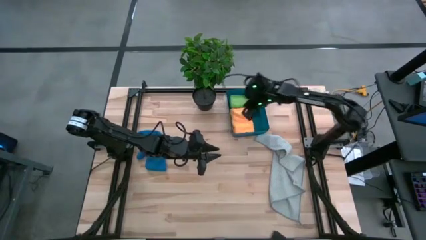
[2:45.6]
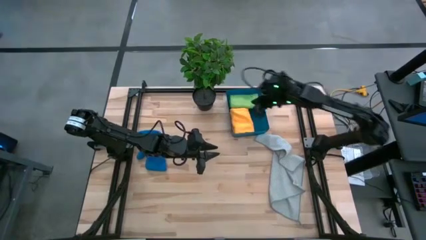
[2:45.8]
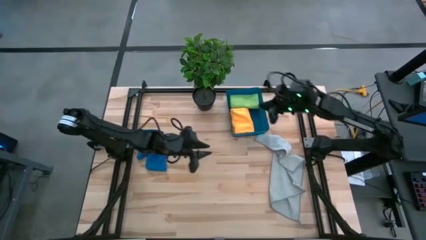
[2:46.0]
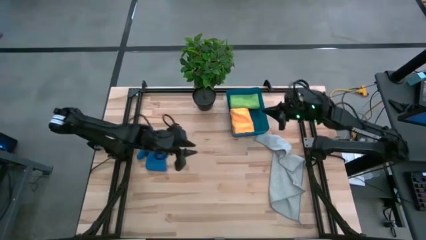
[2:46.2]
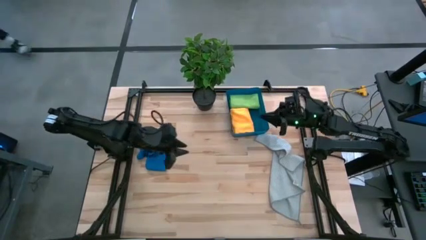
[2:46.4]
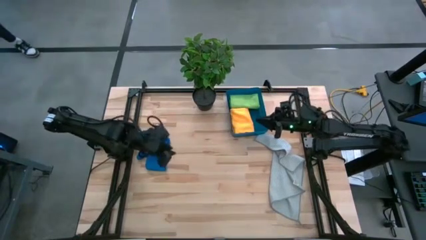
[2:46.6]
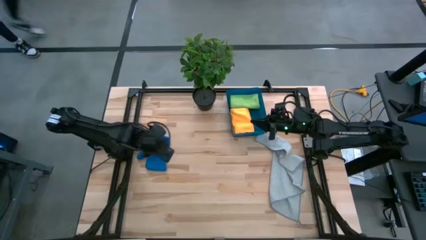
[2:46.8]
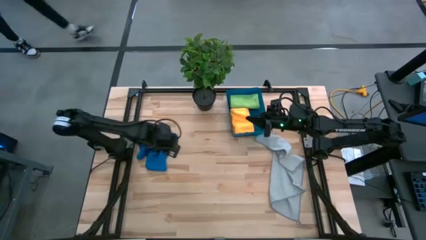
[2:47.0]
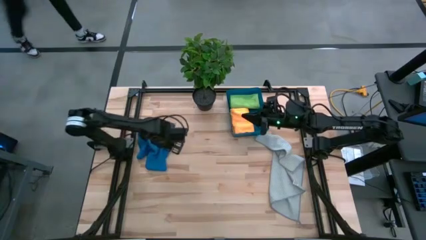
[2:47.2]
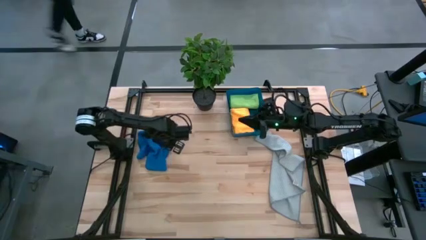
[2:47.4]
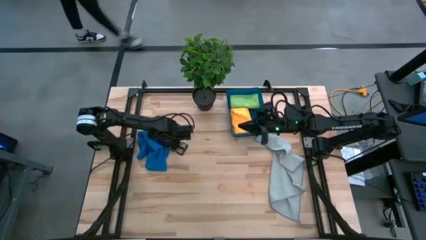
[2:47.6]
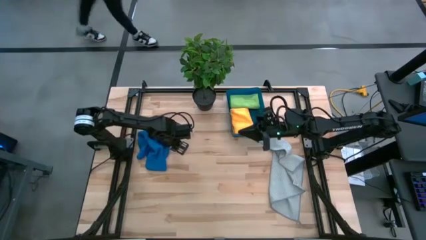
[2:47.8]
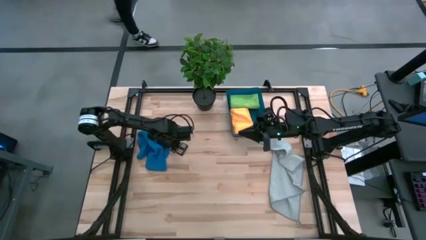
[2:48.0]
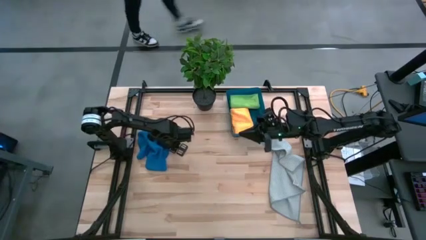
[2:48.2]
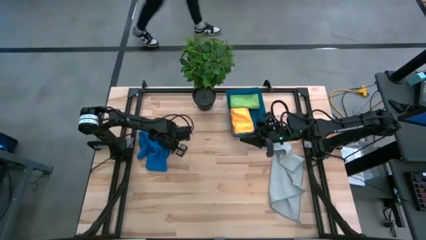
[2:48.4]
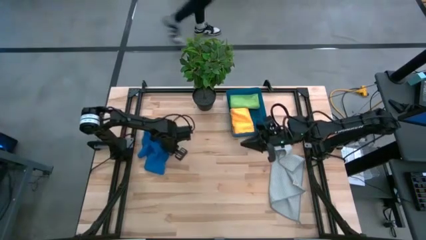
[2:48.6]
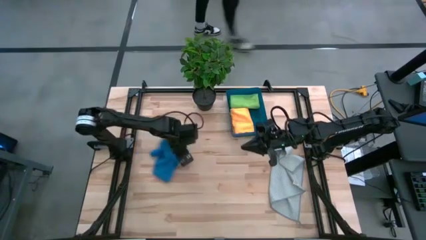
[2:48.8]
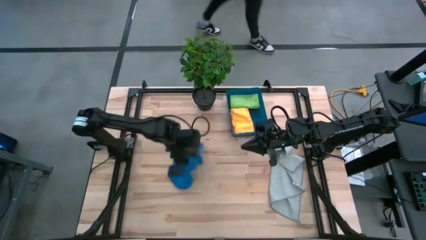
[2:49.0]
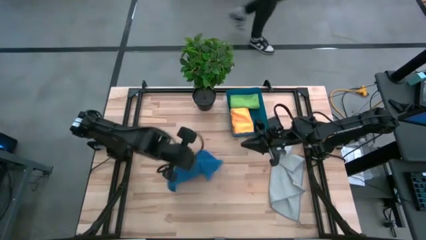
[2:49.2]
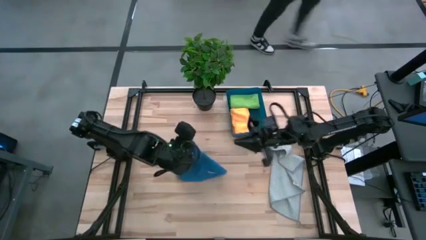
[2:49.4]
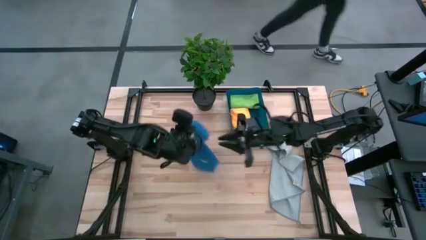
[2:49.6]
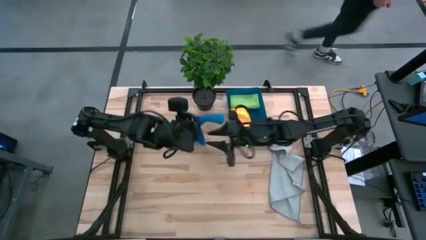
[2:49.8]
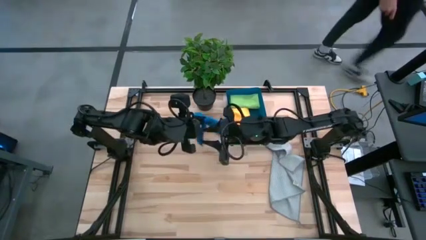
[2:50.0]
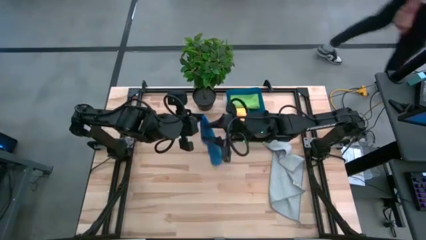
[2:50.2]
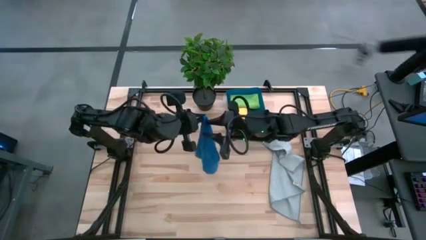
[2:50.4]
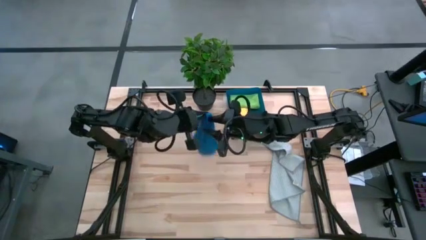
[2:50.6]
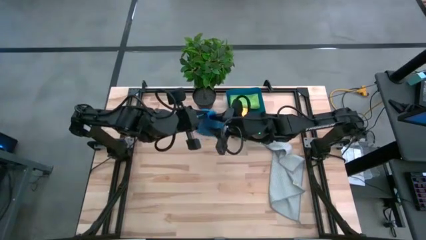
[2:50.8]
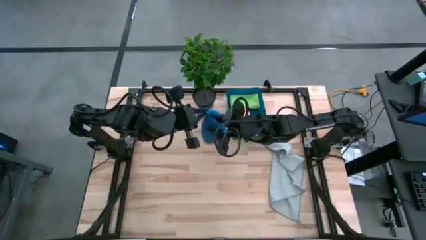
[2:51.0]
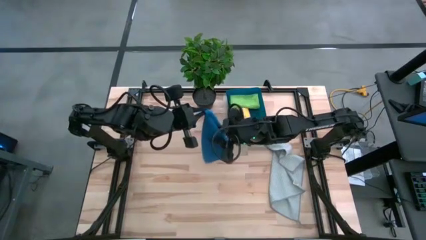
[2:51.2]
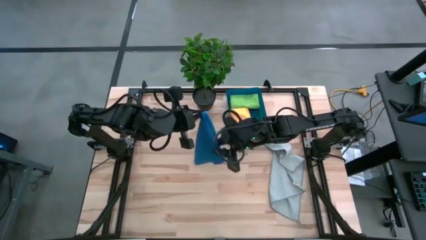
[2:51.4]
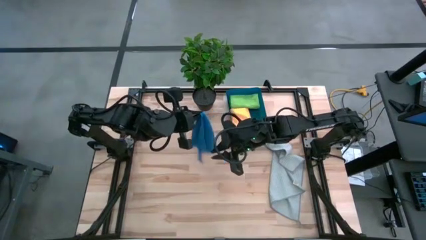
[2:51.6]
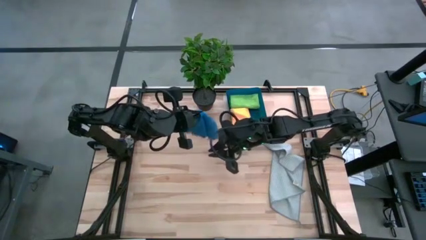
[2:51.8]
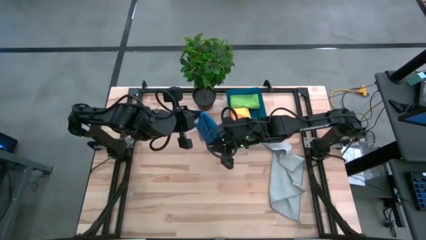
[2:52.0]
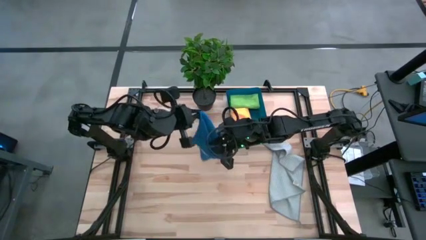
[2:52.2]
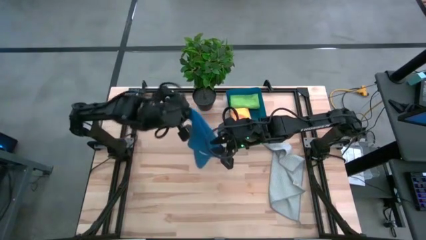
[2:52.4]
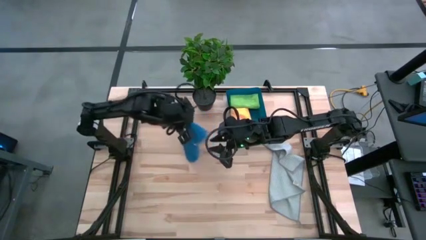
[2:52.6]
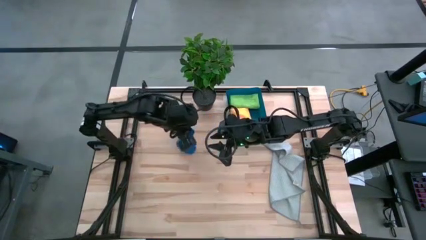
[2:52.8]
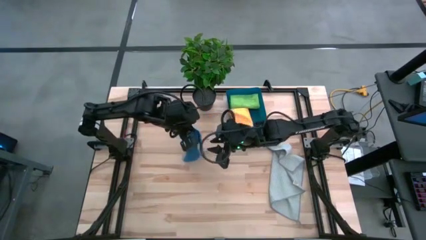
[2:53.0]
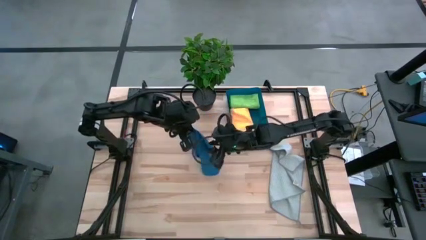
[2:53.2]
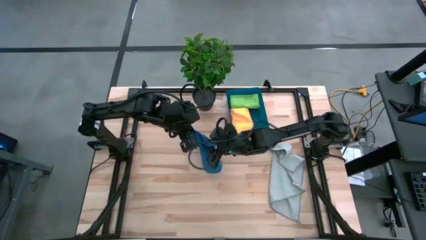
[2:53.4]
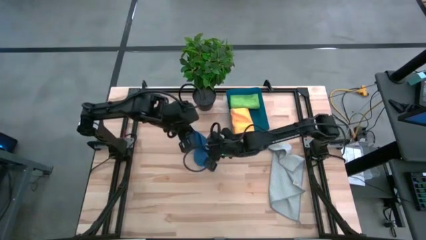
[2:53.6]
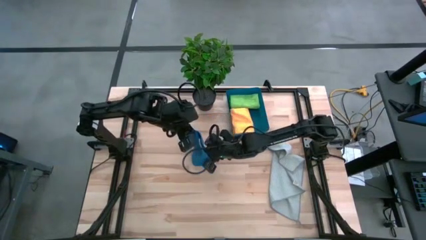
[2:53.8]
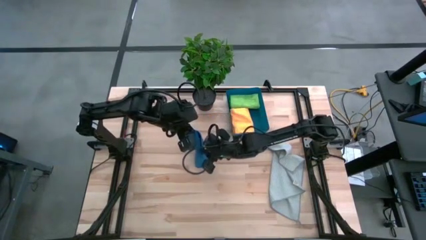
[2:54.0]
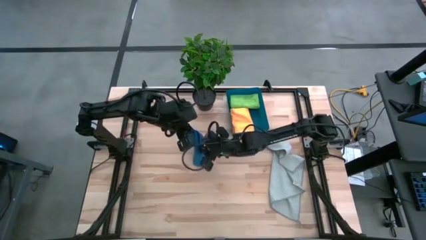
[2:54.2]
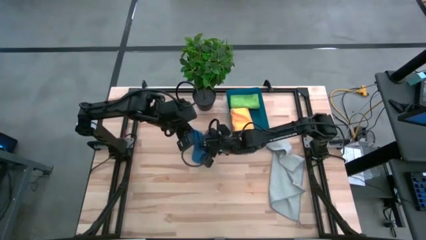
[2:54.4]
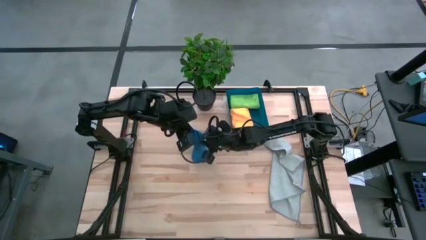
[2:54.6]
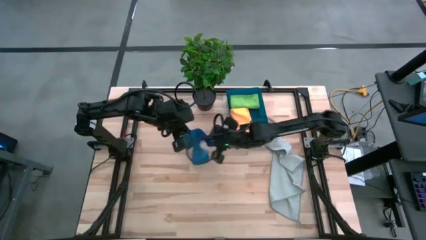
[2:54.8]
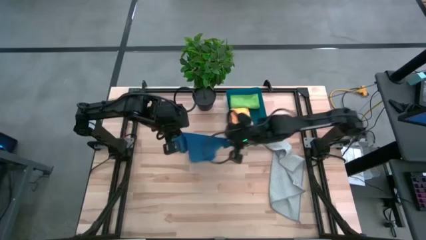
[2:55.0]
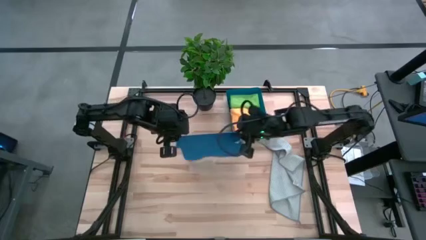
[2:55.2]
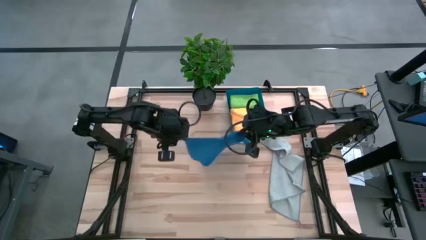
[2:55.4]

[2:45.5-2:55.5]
Task: Fold microfiber towels
Fold the blue microfiber towel

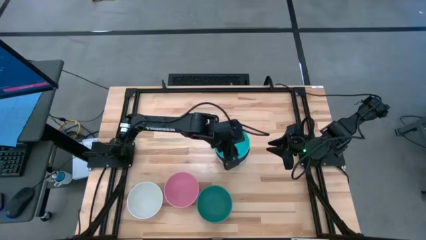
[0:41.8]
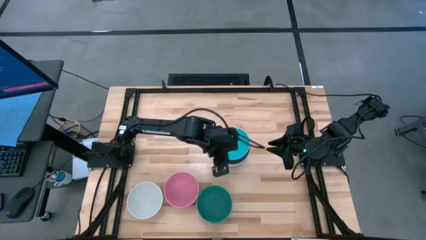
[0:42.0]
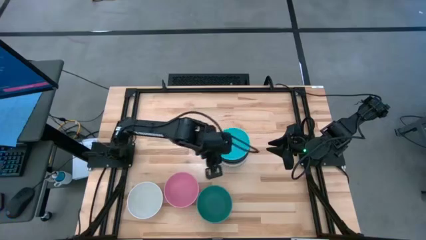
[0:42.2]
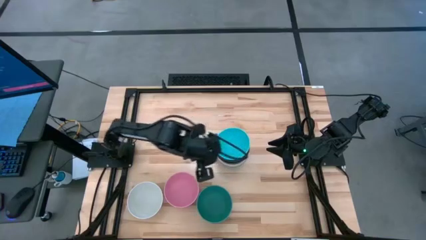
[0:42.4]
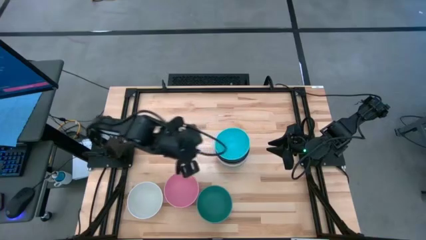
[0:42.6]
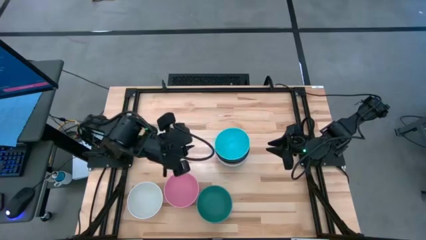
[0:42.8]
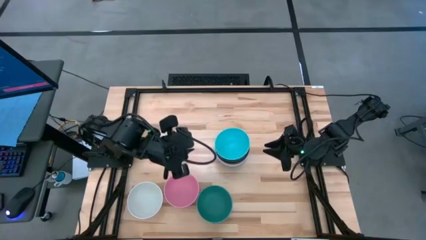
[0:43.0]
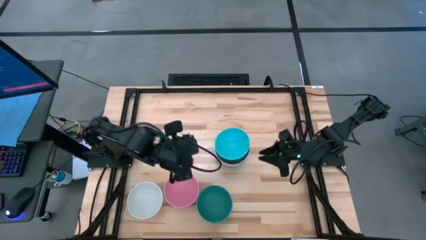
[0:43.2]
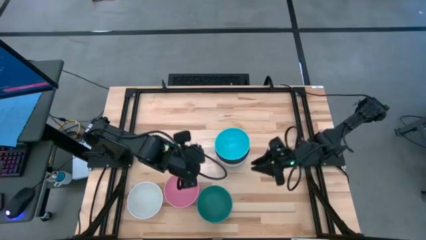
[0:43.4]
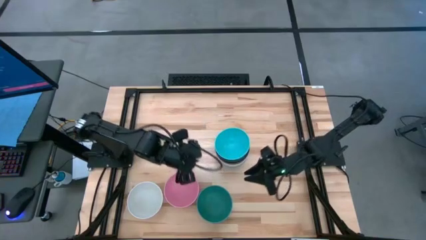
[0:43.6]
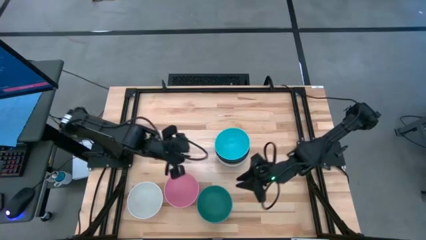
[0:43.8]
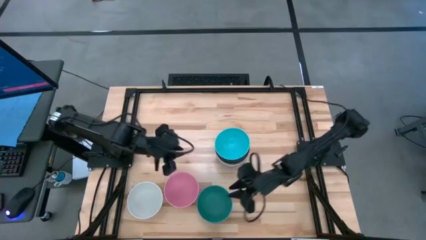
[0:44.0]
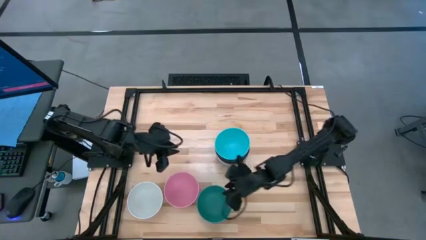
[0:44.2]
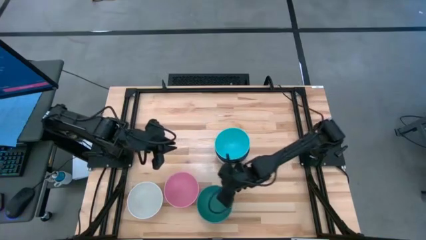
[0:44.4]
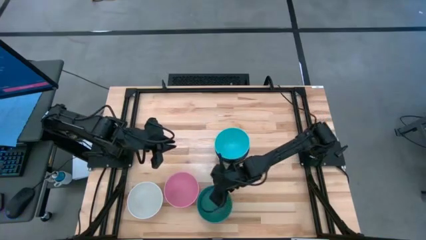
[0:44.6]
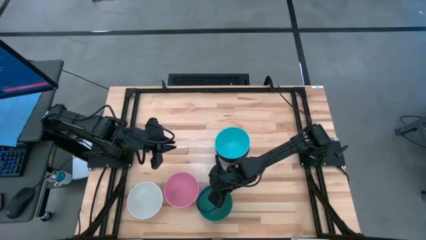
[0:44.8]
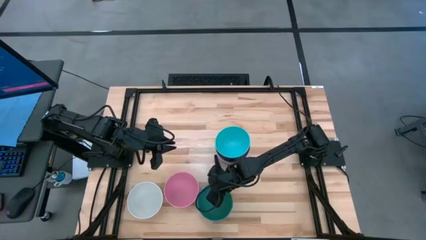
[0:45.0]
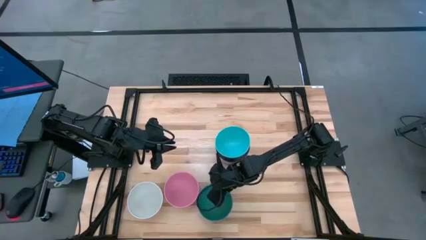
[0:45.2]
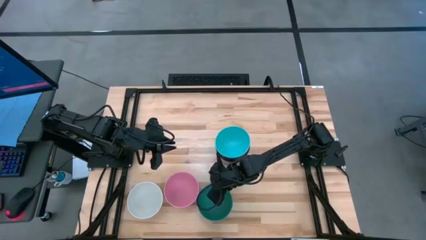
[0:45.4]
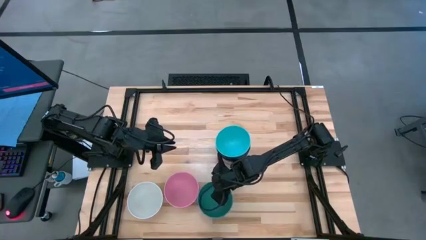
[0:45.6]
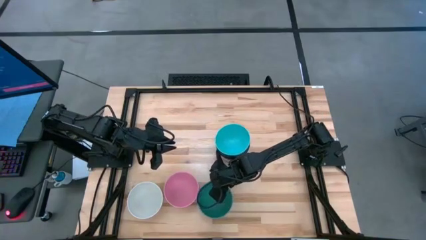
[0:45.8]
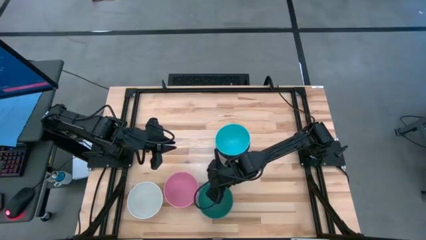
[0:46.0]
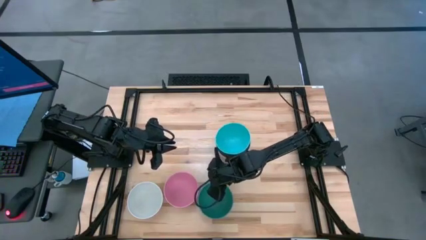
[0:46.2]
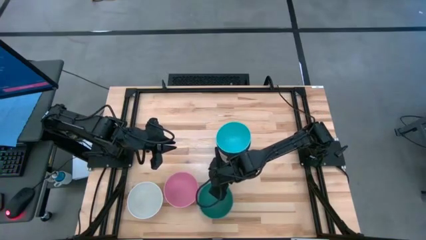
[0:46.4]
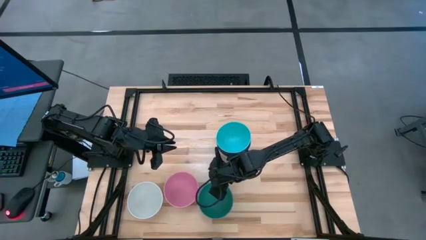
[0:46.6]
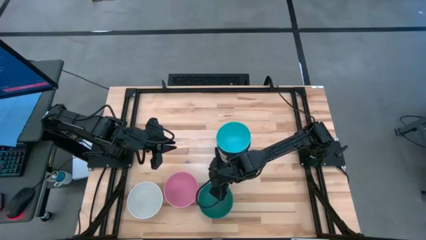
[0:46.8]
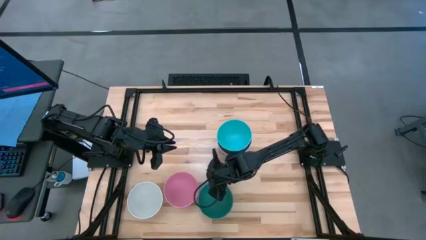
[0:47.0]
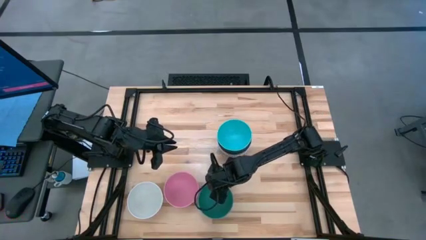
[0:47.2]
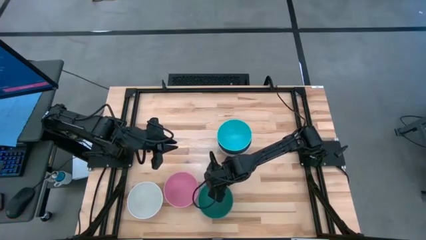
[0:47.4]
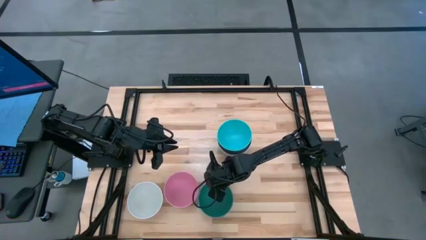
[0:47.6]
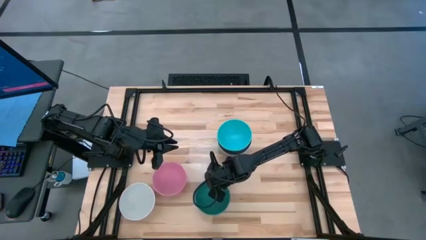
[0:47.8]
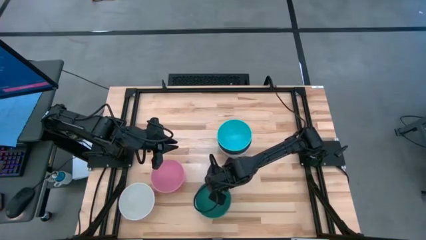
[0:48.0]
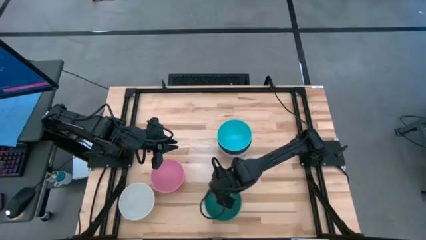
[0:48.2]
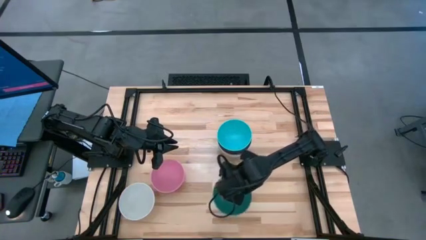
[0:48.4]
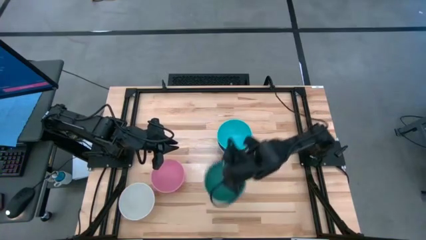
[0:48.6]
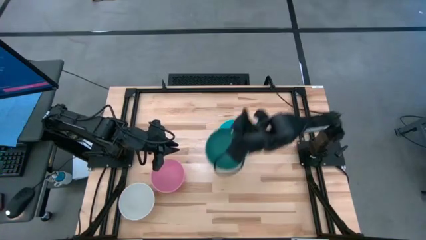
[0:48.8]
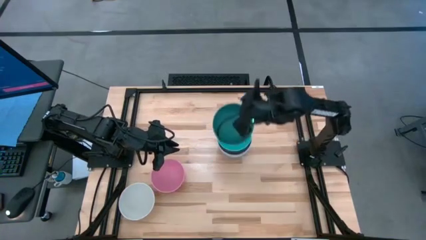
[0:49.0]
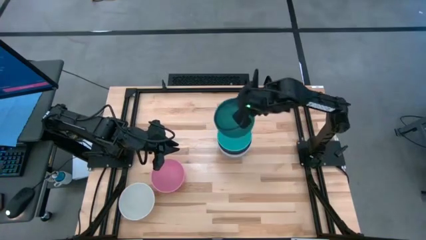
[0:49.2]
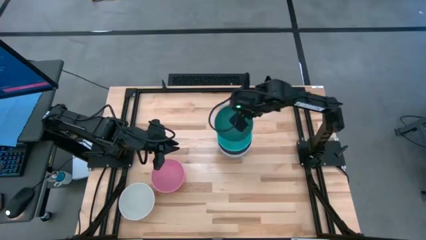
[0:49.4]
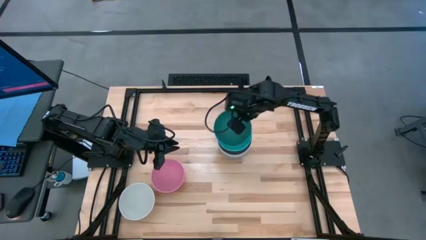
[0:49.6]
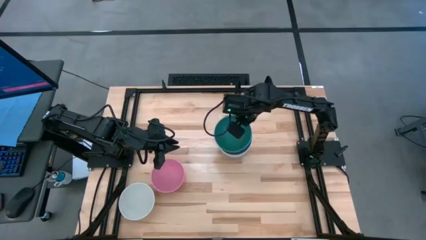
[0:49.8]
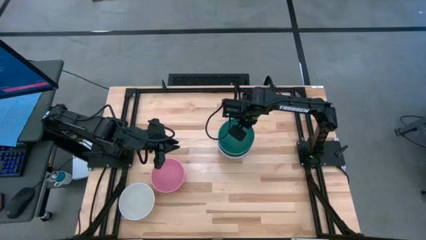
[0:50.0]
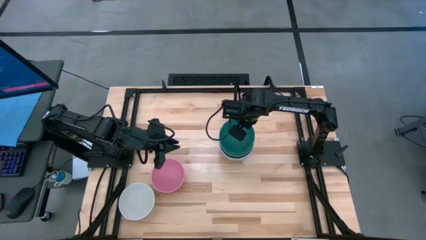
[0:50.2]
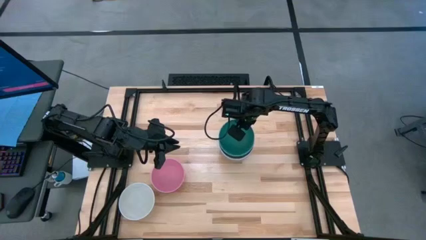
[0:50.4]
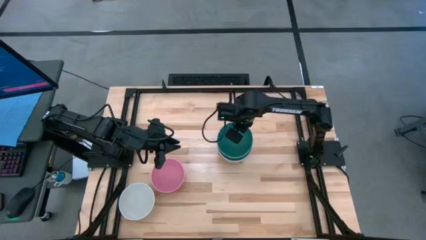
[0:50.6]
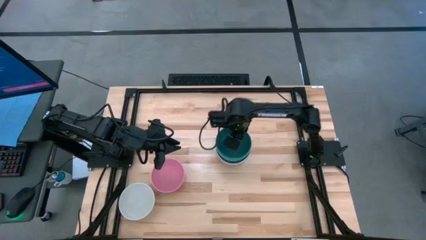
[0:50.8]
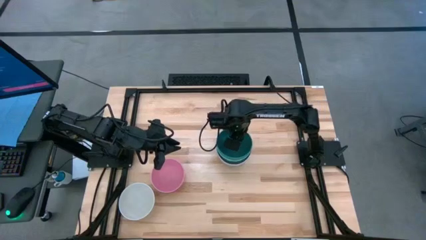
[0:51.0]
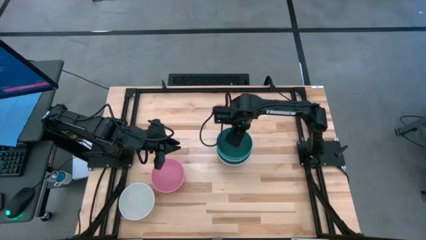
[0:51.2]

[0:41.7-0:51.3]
Task: Nest bowls inside each other
Stack the green bowl on top of the light blue bowl
